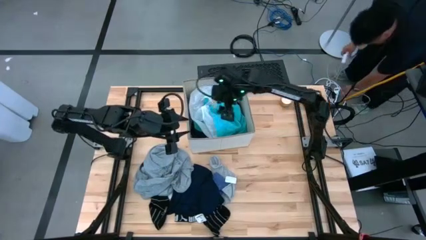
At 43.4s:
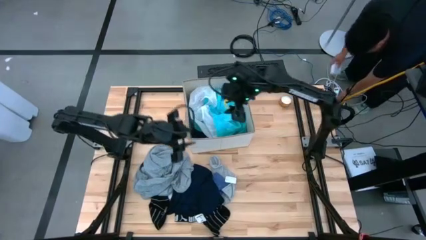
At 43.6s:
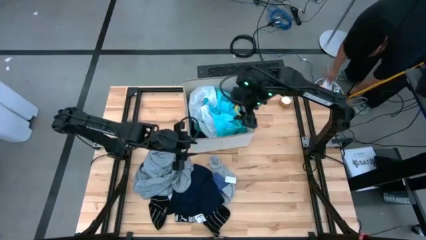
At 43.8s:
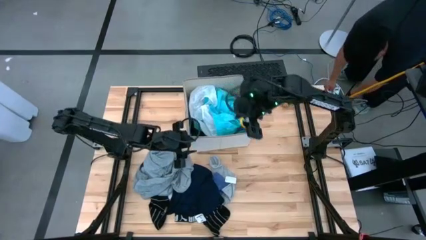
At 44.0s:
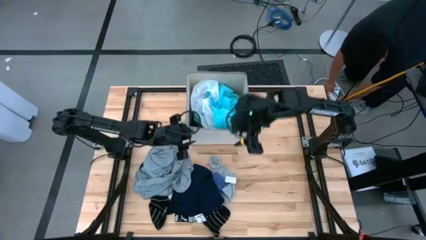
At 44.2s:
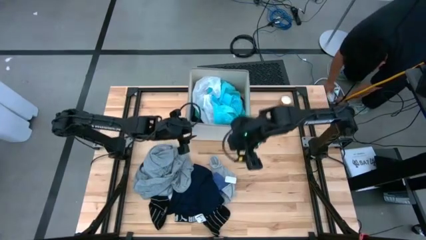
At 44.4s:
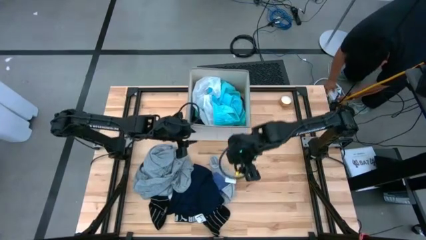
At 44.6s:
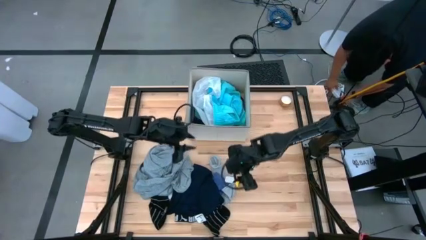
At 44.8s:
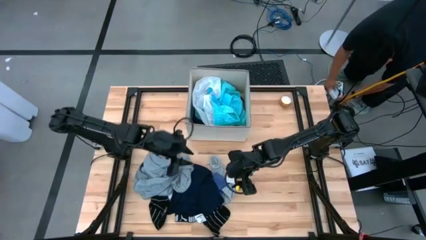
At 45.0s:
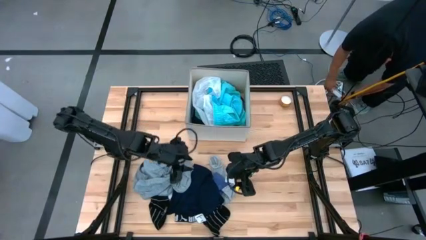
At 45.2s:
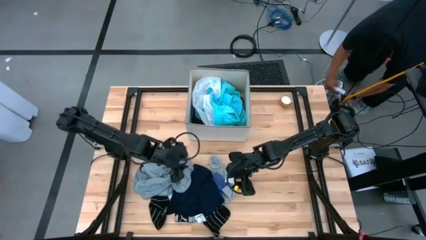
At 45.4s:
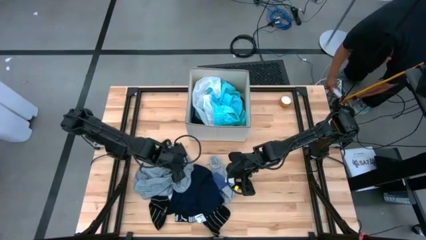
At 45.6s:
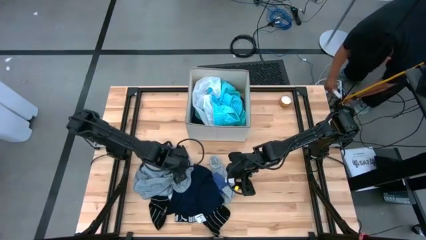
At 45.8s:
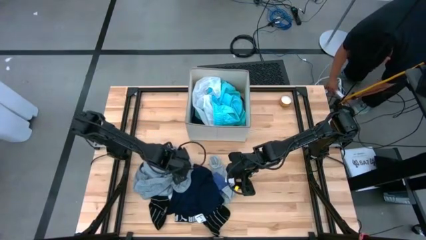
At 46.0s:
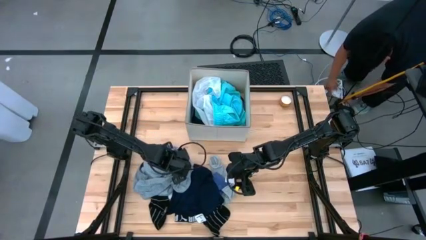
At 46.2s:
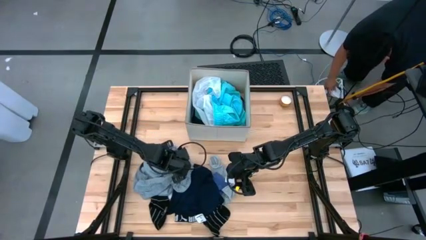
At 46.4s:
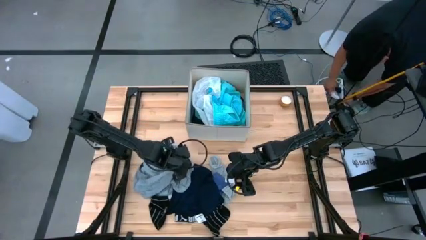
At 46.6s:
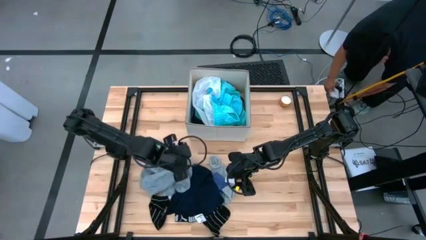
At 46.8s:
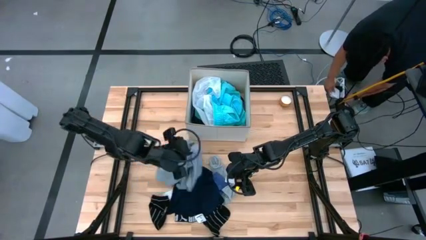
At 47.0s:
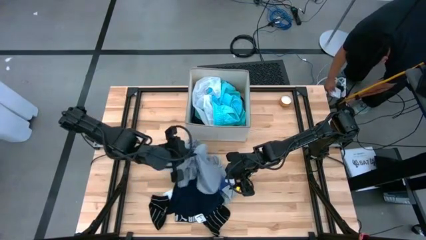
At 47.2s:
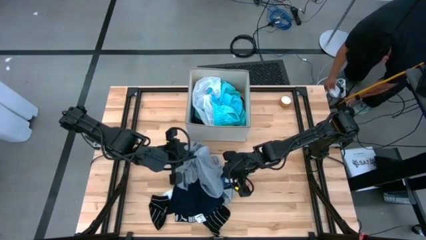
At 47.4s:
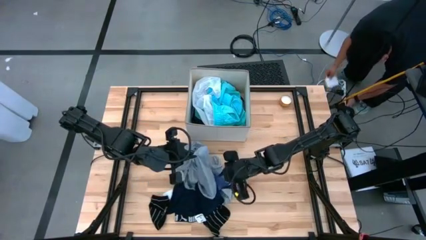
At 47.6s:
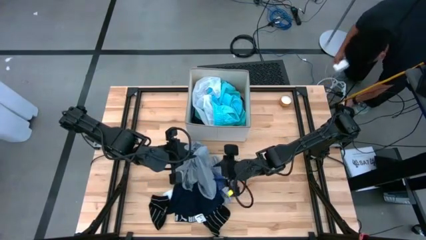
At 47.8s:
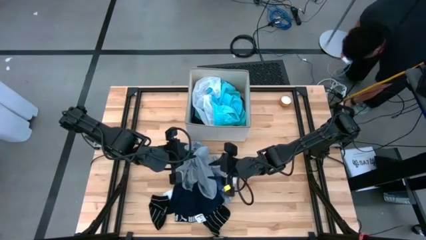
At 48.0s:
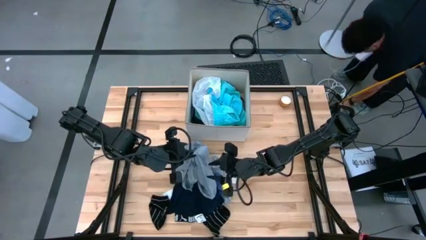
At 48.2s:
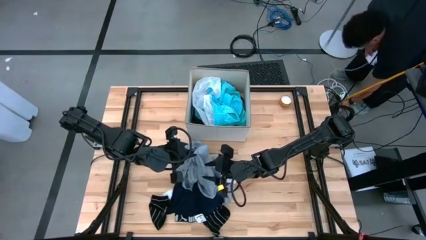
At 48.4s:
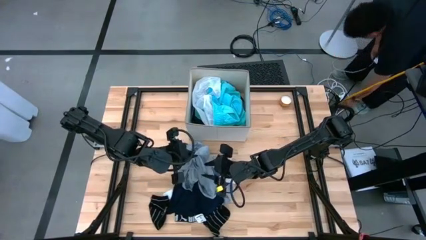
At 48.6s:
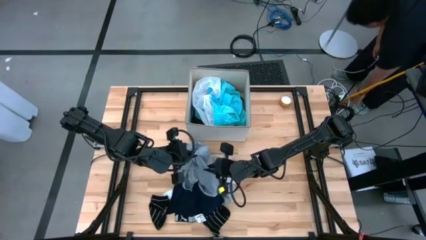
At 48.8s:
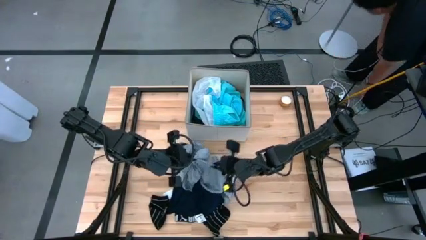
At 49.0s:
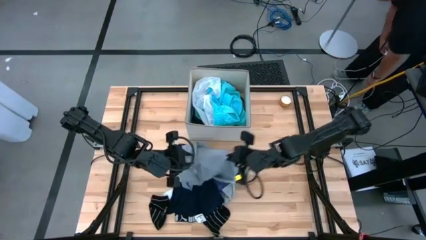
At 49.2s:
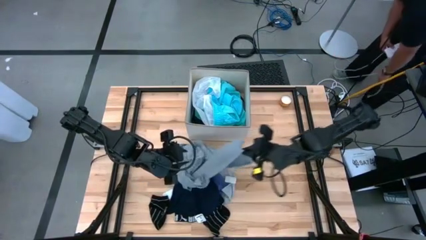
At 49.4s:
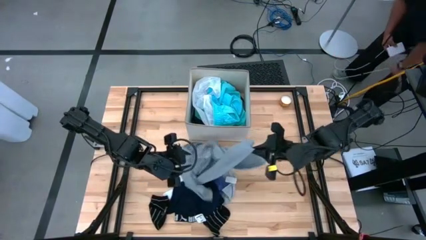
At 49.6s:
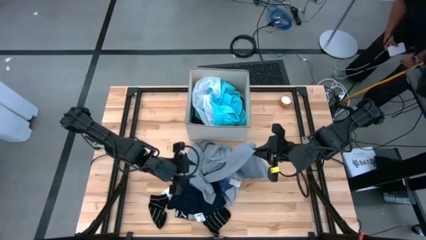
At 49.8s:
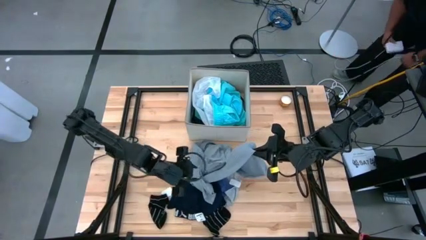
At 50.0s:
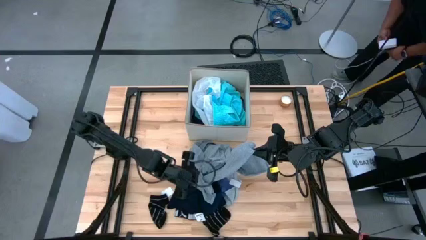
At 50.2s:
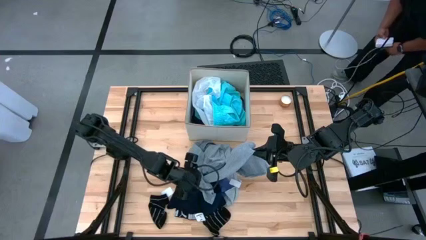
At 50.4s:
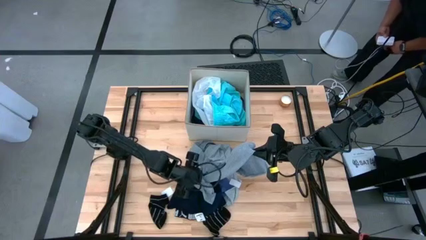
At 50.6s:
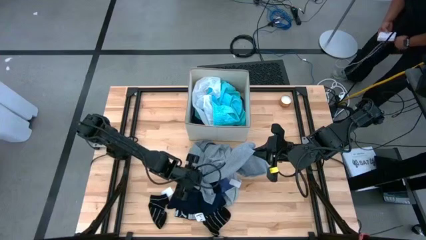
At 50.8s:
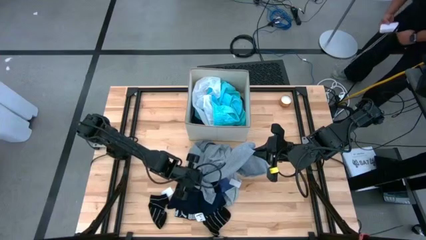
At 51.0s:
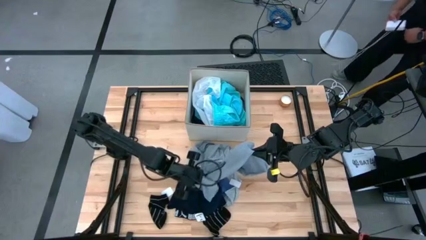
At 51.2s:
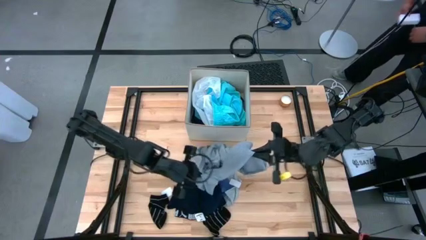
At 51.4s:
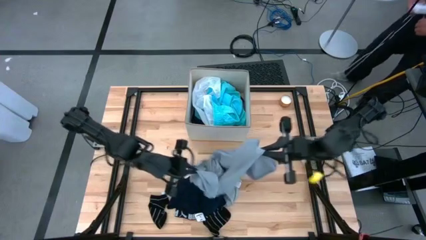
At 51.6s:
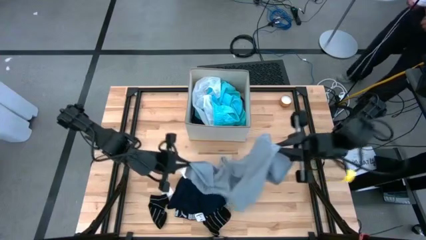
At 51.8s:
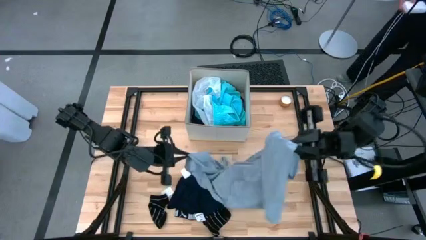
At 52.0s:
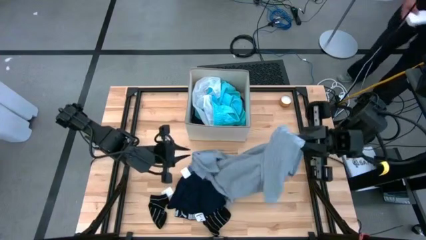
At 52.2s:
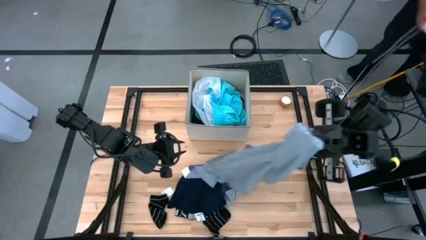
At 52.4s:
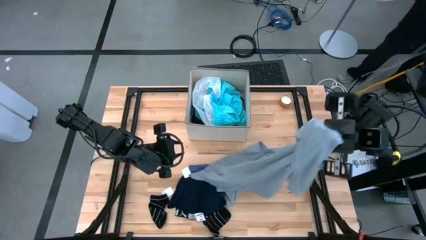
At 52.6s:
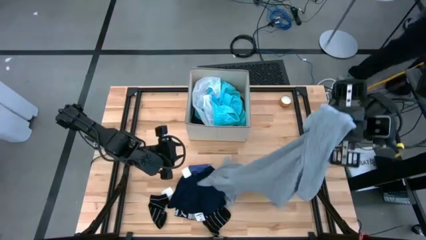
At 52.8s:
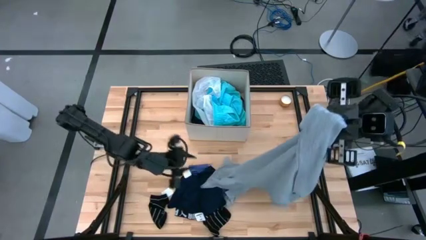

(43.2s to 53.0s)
Task: Sort clothes
Put the gray shirt into the laundry bin

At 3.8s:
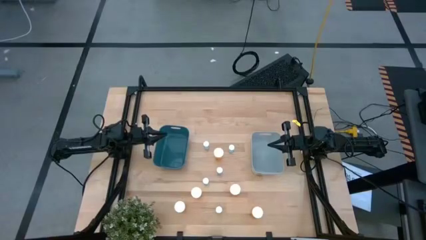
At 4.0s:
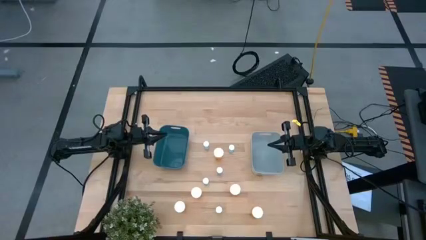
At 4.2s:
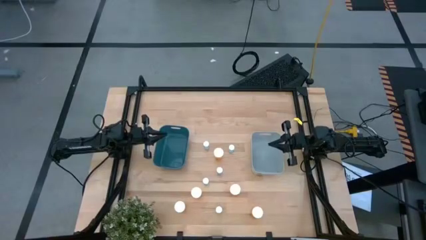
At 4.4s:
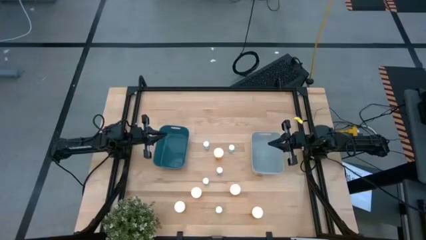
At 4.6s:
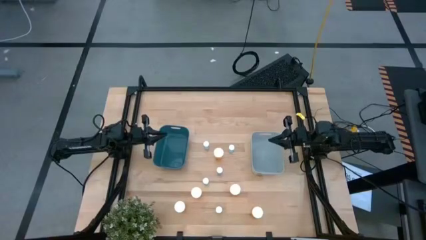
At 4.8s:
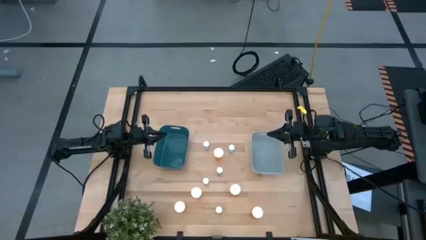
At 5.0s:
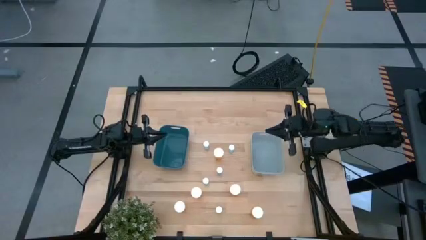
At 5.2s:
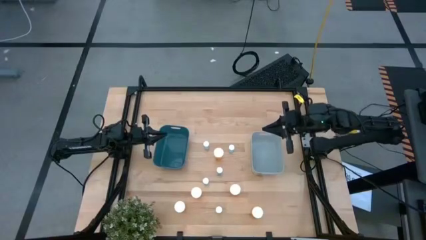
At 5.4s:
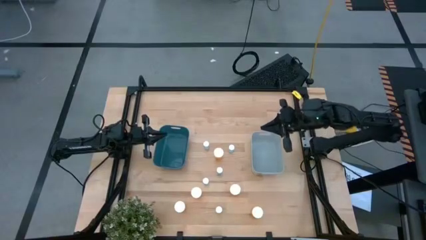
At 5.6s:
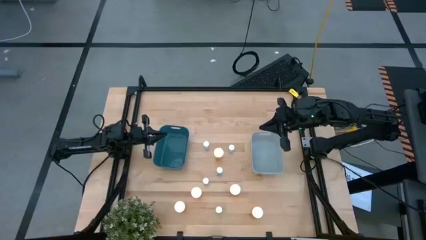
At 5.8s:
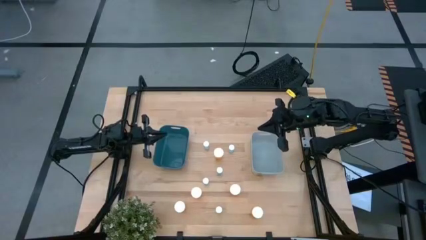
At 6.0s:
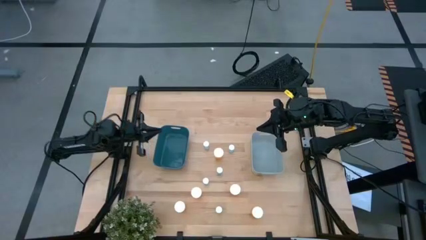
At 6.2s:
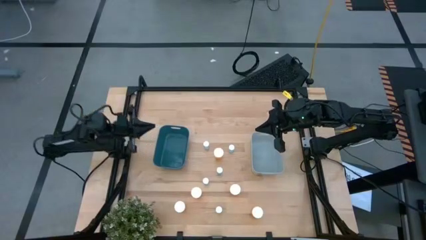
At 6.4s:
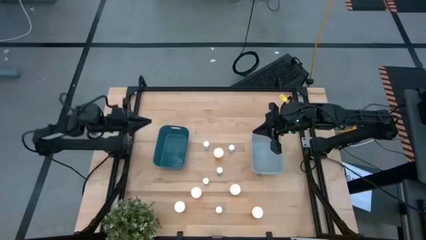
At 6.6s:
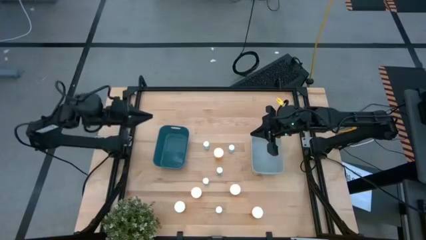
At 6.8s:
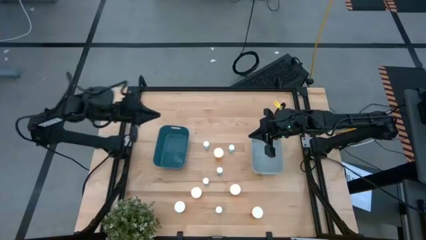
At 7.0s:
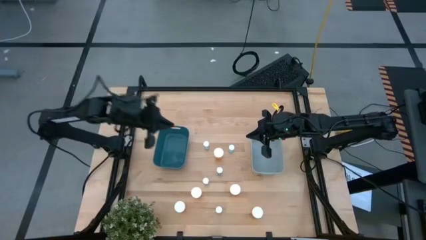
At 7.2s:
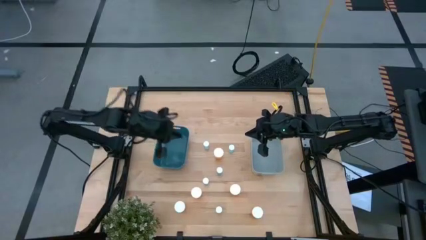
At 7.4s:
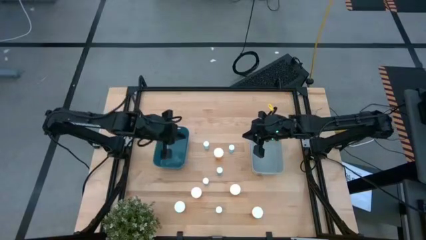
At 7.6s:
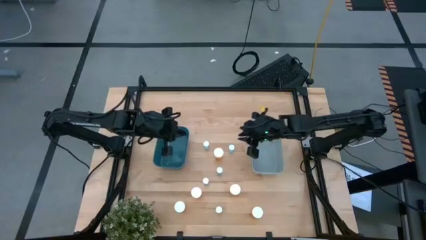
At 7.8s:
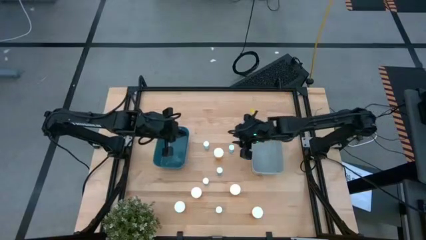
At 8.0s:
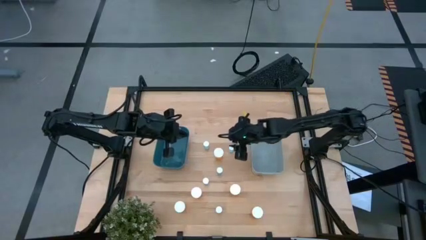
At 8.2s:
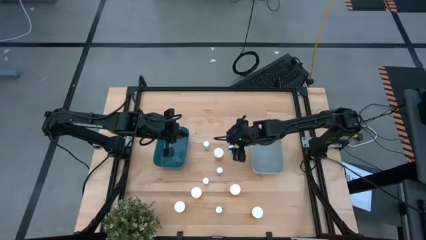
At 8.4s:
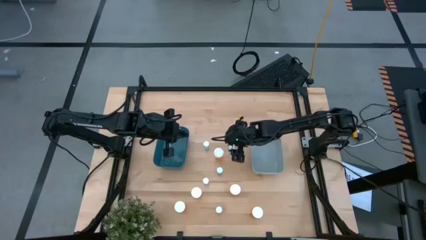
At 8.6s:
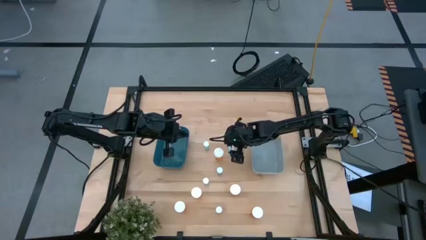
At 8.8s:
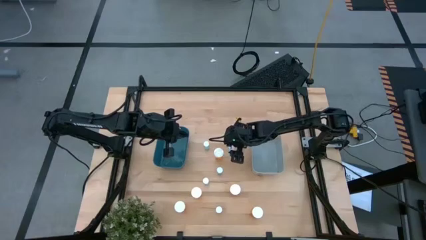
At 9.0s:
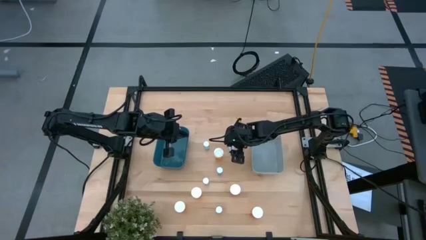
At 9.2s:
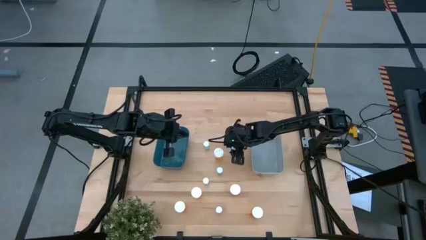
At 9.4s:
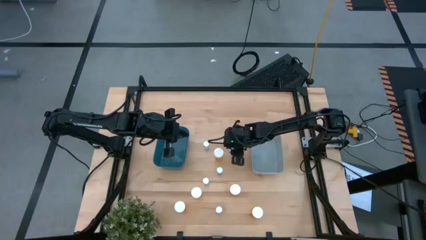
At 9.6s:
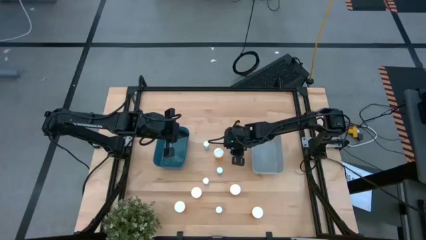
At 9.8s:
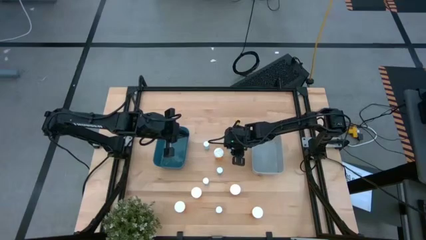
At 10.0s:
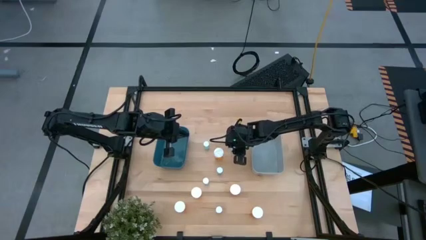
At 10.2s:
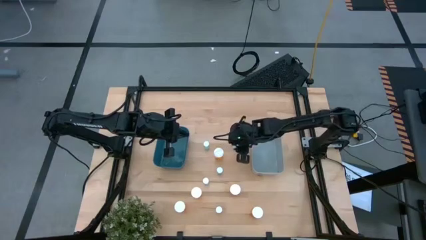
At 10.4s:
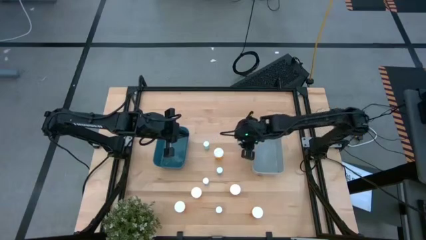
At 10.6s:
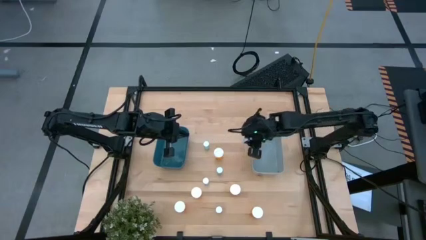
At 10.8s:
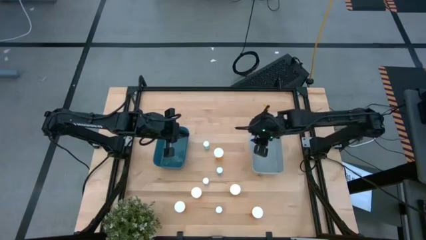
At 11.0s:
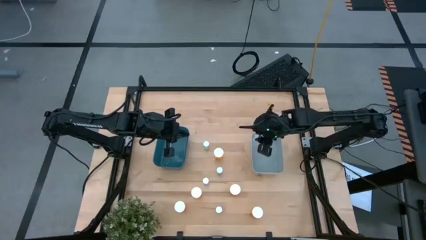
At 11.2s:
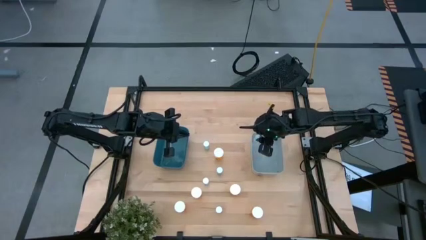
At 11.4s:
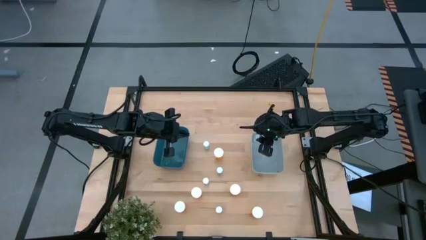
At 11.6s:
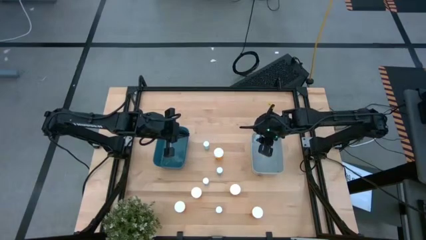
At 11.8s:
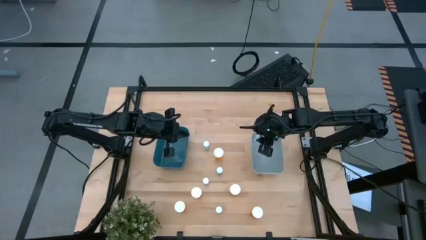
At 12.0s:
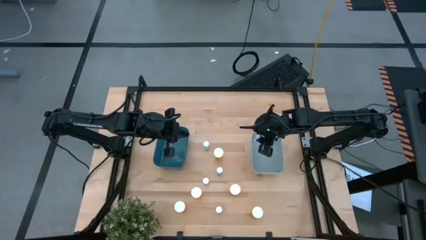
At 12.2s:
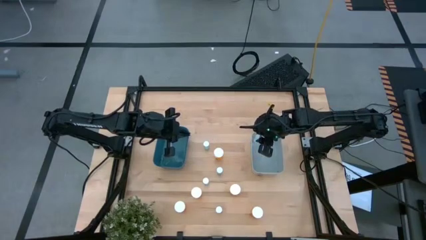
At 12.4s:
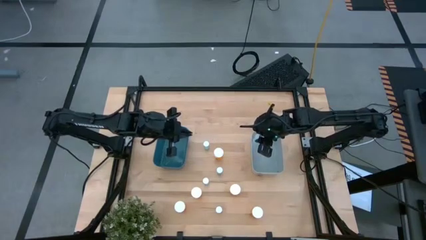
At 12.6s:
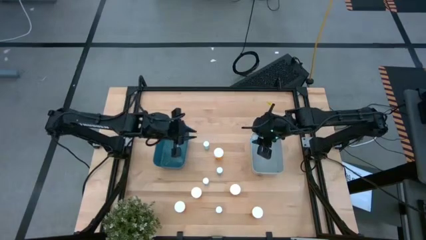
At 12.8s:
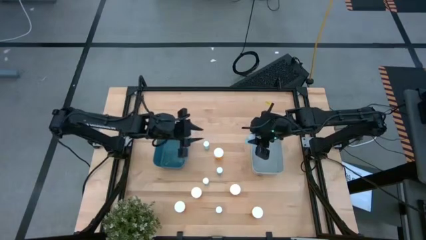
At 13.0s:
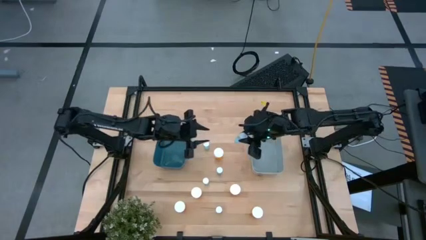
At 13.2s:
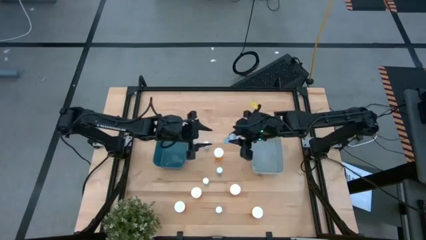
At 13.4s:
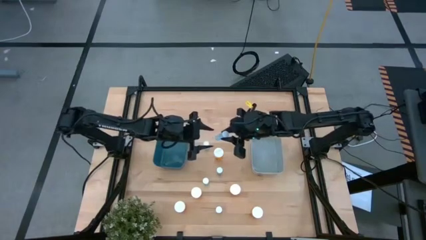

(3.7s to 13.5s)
Task: Pick and place medicine bottles into bin by pill shape (circle, oval)
Put the blue pill bottle into the blue bin
